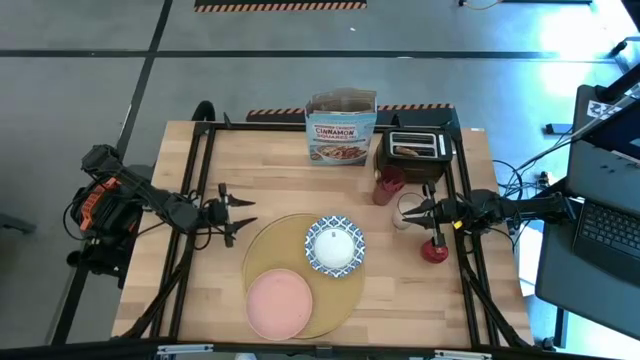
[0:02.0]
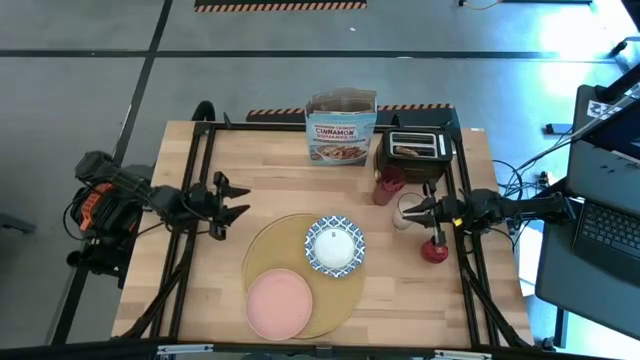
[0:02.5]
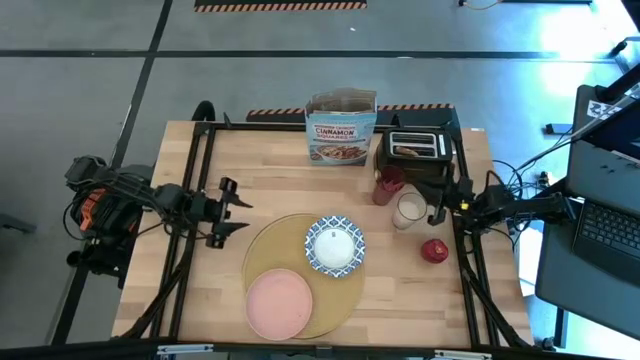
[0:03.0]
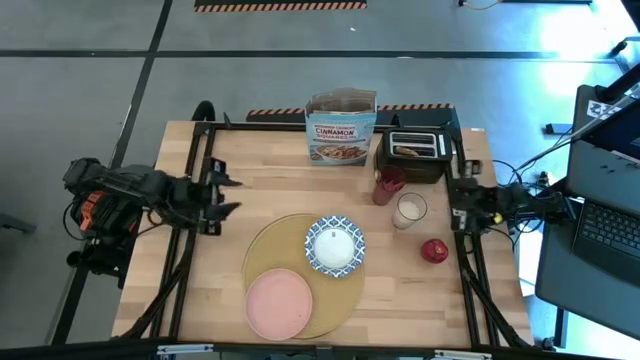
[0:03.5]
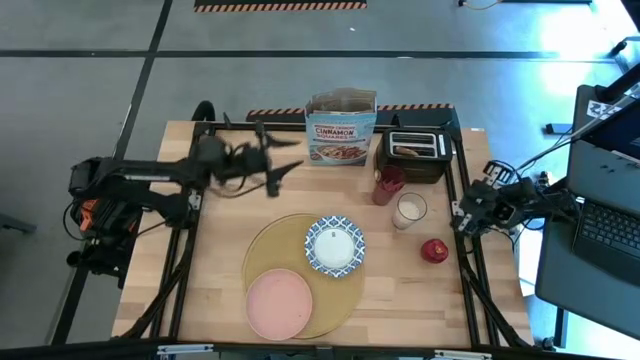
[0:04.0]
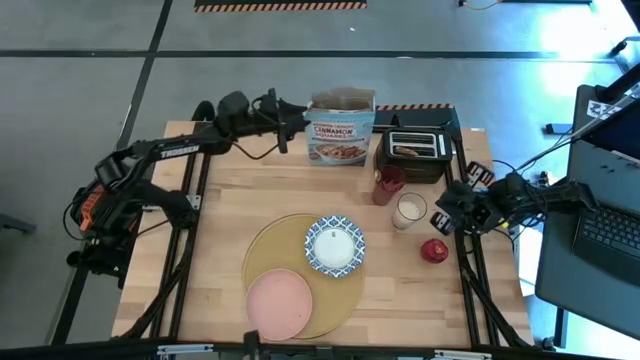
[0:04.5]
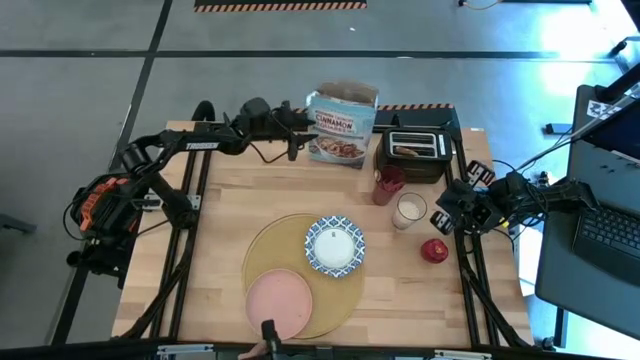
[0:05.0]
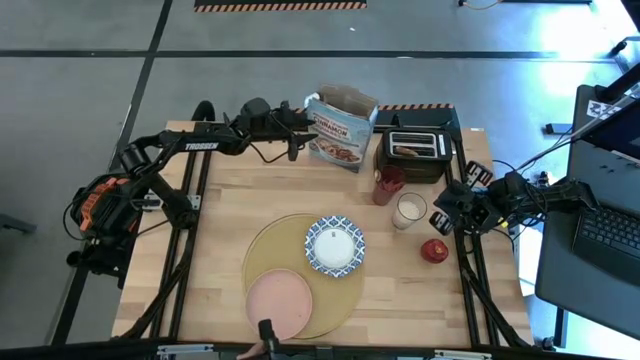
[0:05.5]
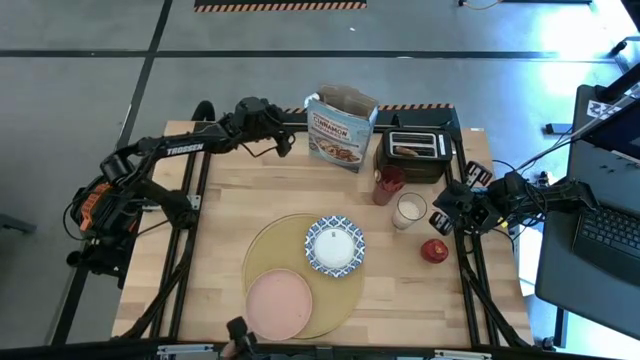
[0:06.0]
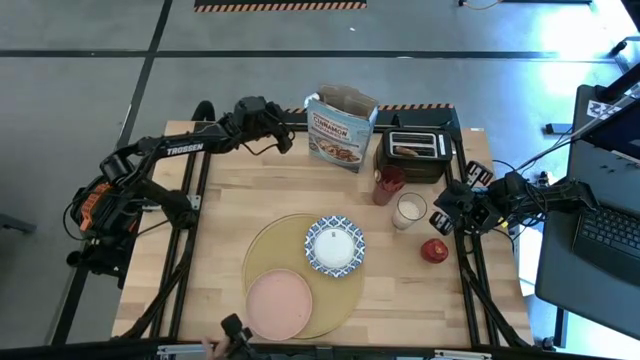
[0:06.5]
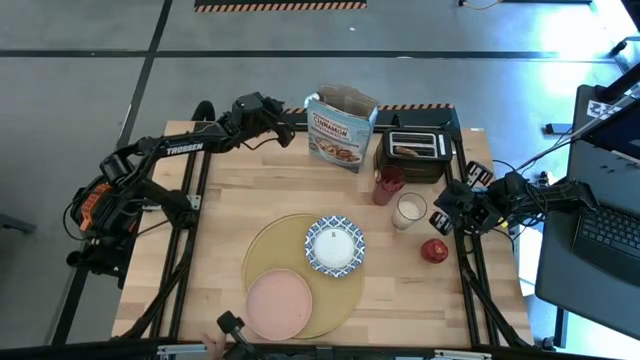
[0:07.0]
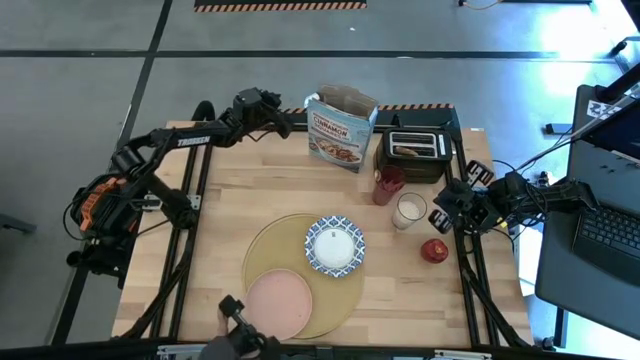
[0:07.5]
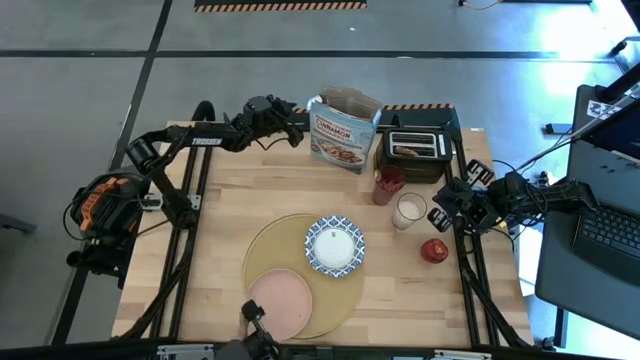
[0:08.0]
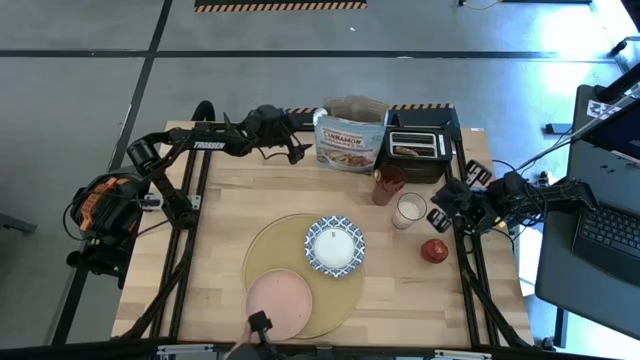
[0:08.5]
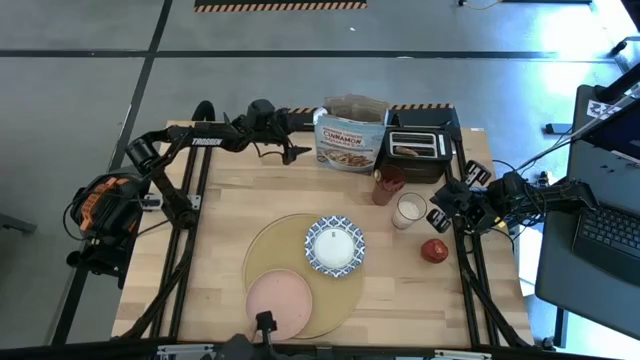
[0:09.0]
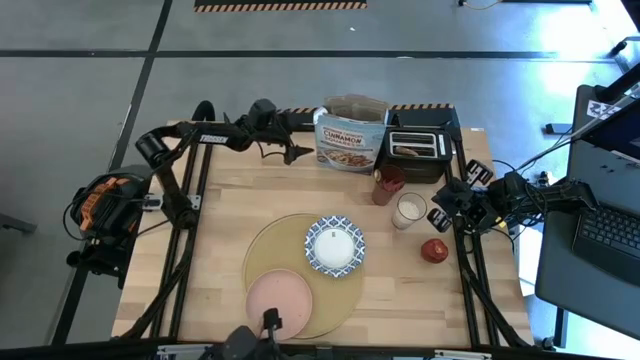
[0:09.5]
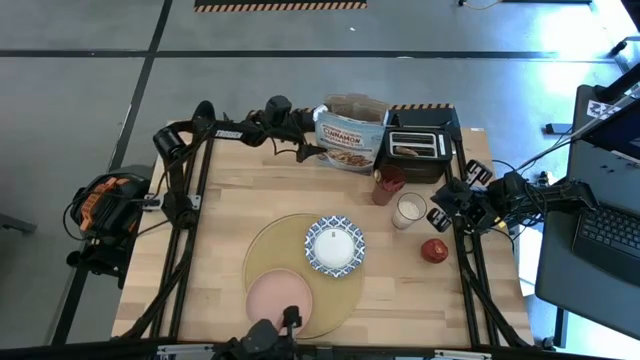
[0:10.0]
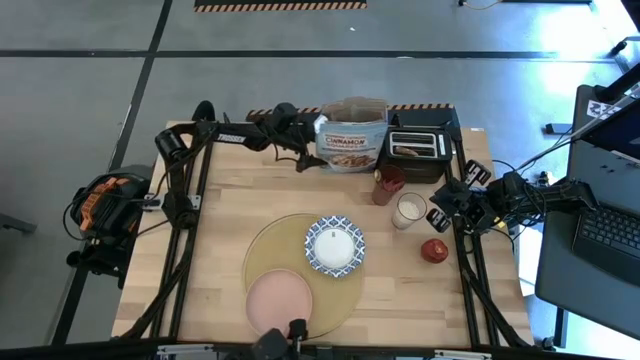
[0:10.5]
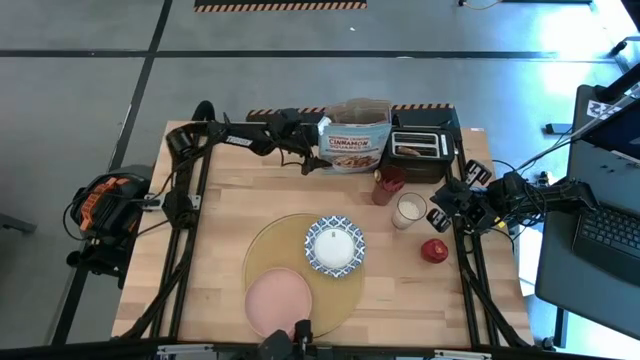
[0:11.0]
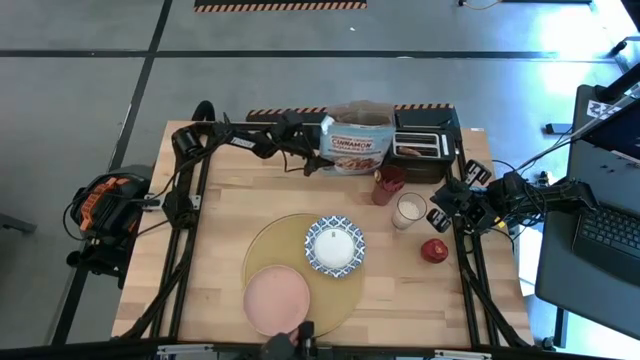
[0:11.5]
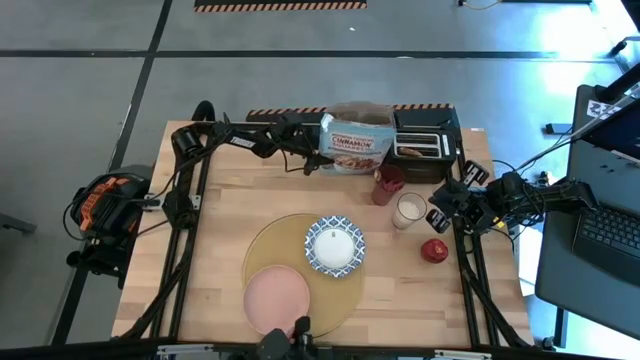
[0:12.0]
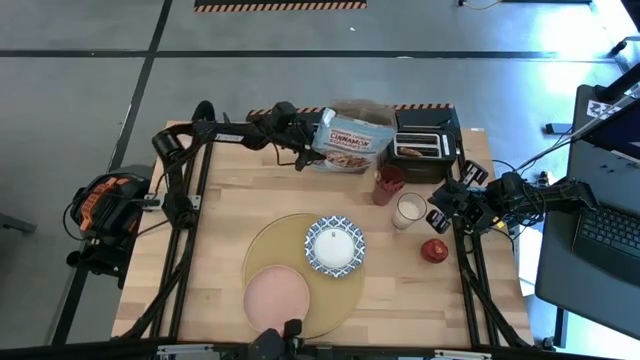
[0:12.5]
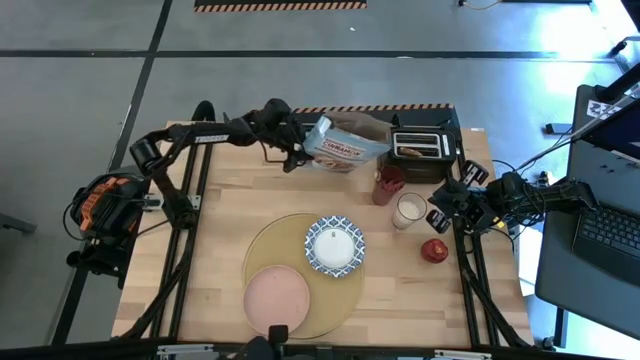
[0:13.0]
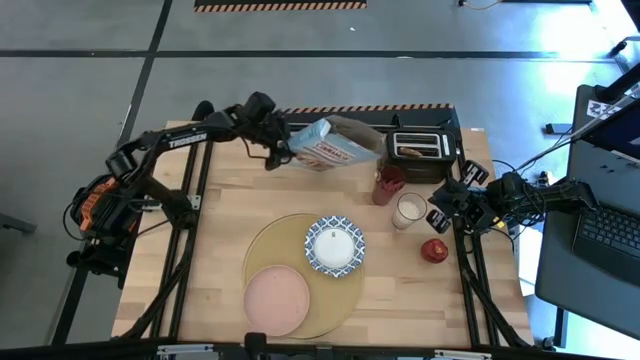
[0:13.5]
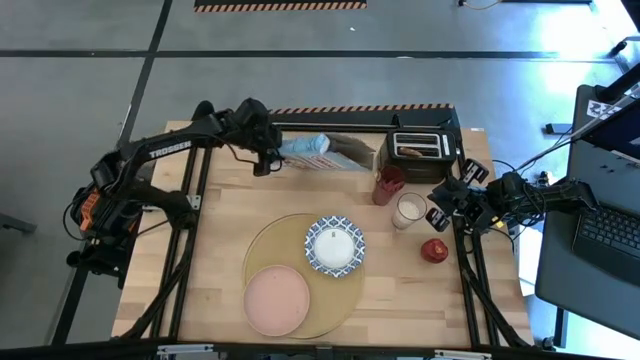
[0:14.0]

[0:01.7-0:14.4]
Task: Arrange a breakfast setting
Pour the cereal from the cereal box into the white pattern bowl

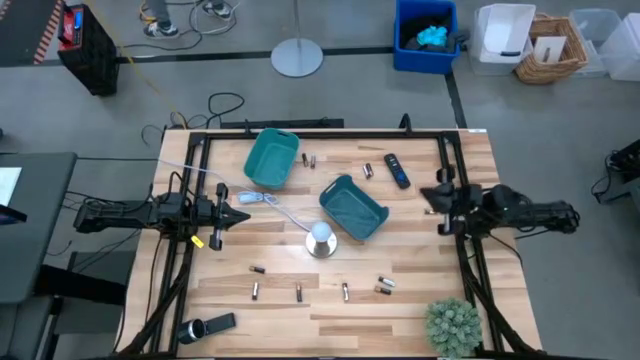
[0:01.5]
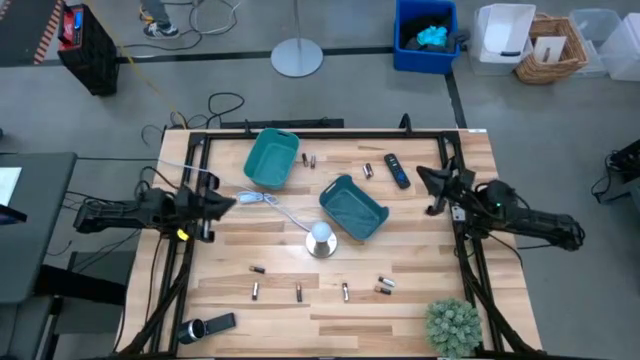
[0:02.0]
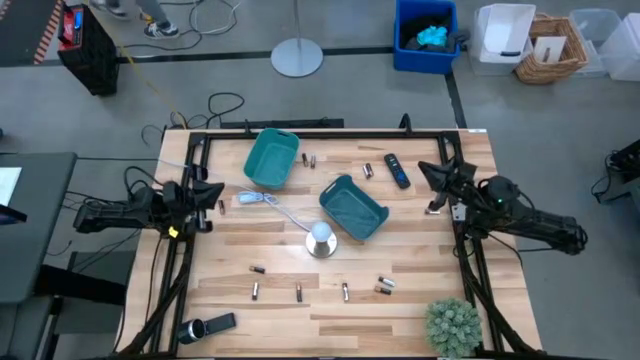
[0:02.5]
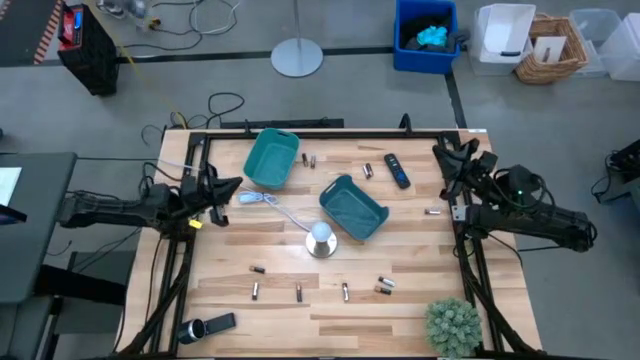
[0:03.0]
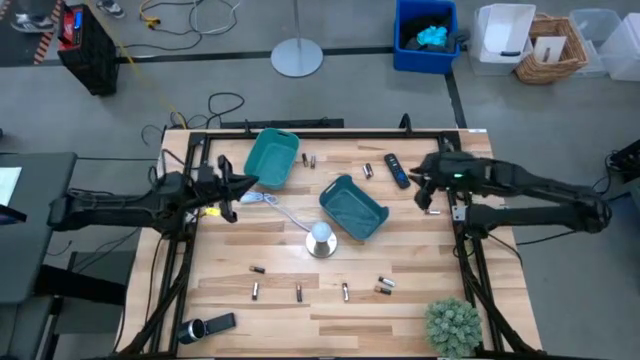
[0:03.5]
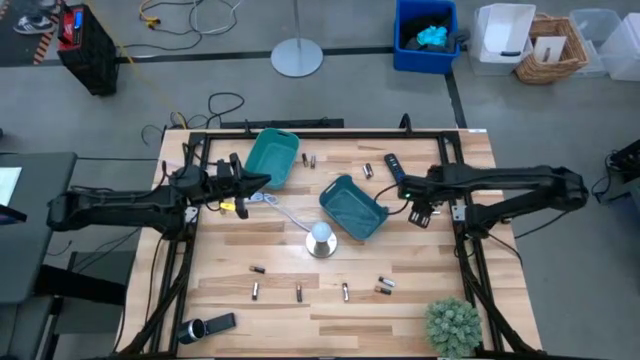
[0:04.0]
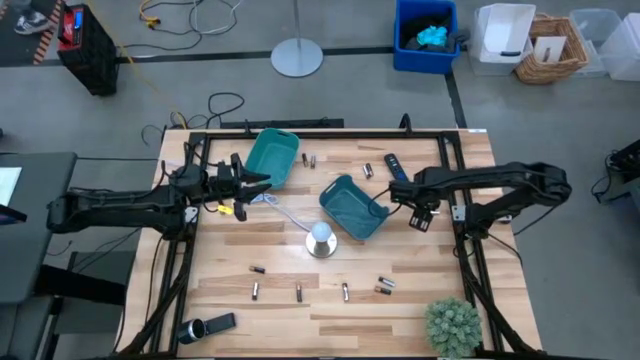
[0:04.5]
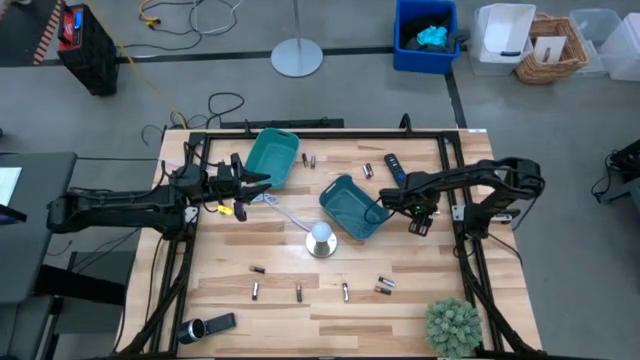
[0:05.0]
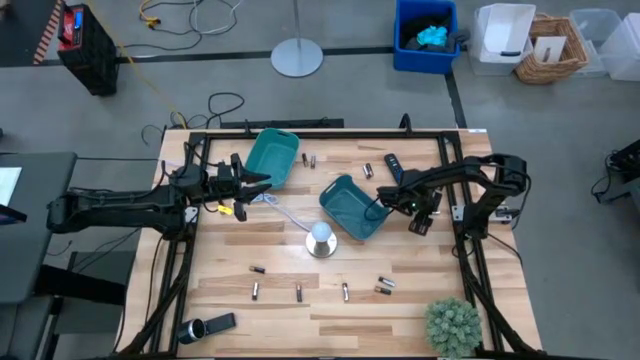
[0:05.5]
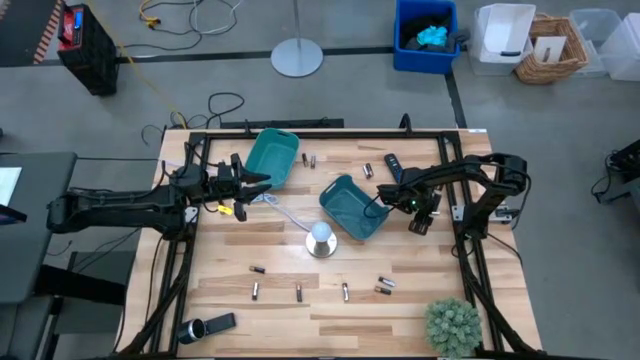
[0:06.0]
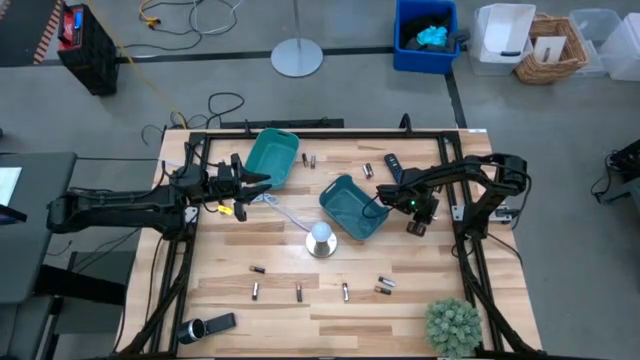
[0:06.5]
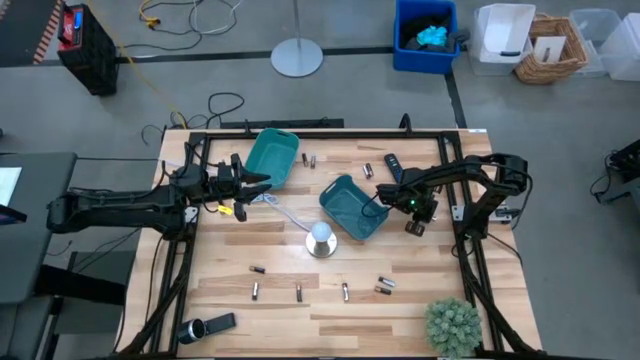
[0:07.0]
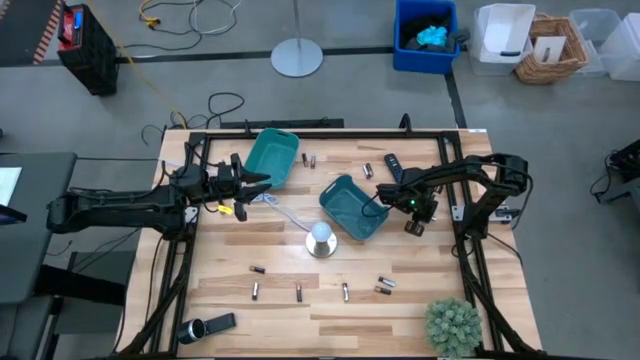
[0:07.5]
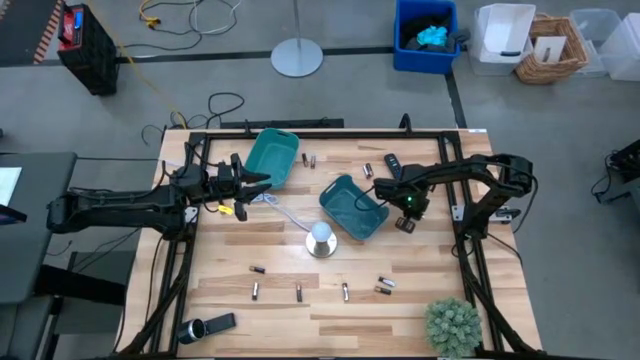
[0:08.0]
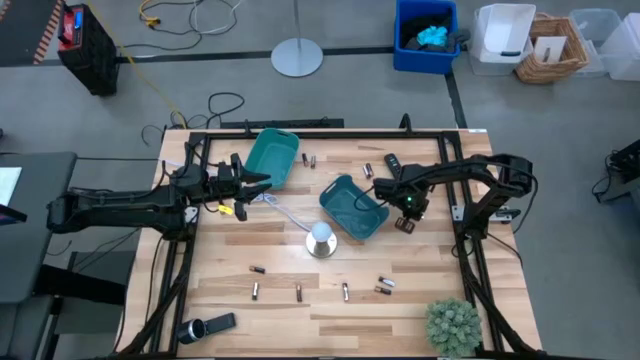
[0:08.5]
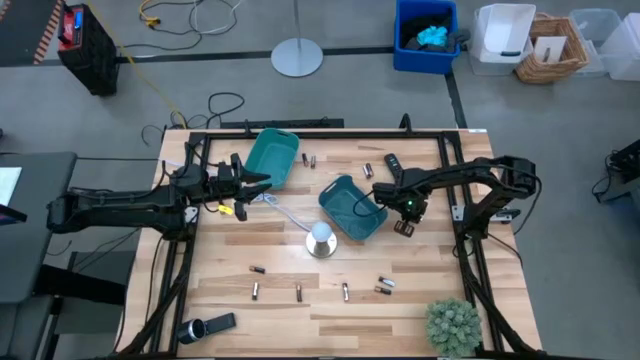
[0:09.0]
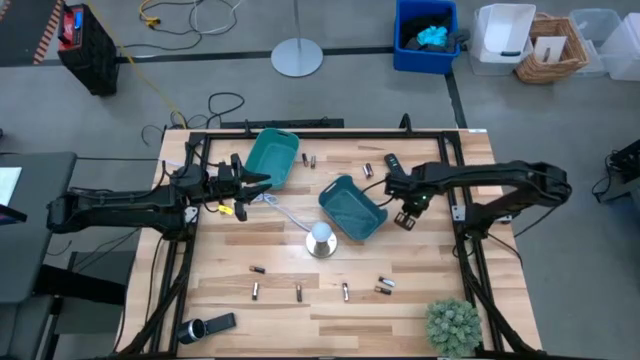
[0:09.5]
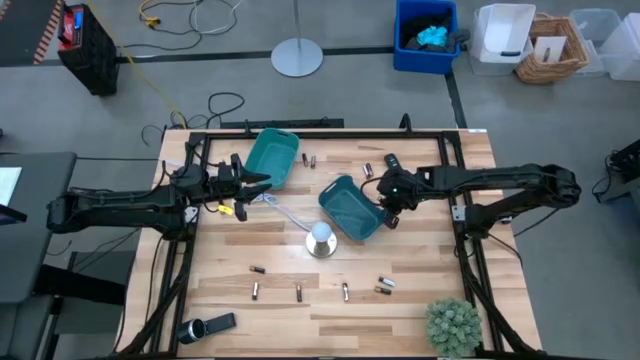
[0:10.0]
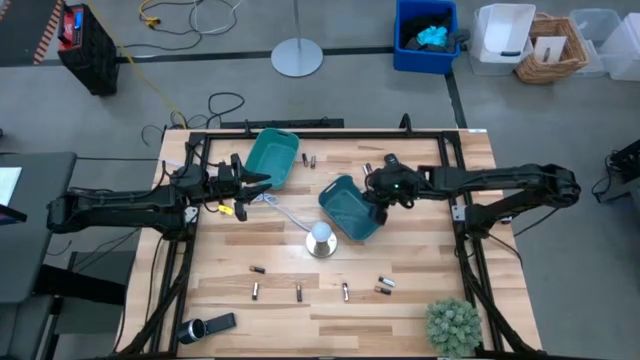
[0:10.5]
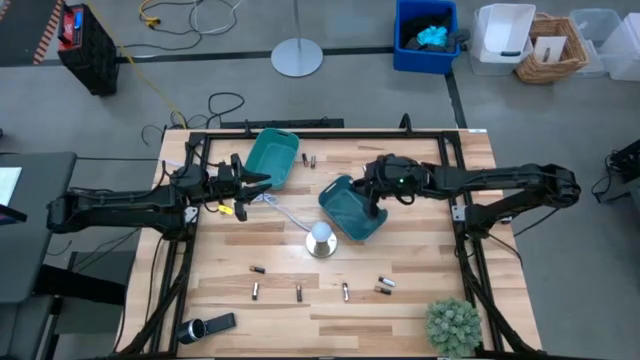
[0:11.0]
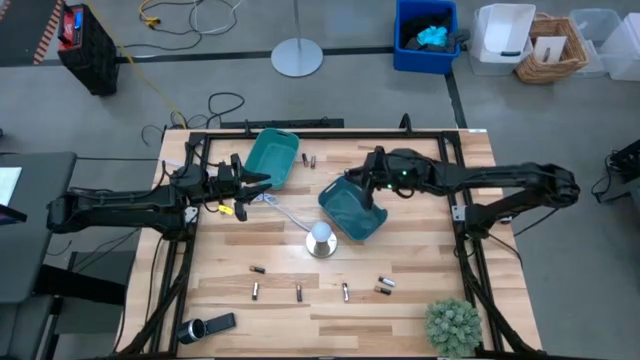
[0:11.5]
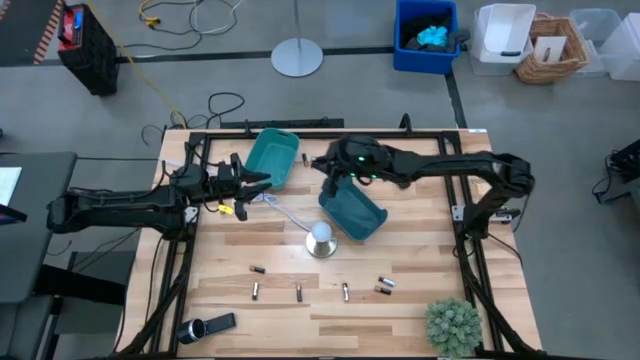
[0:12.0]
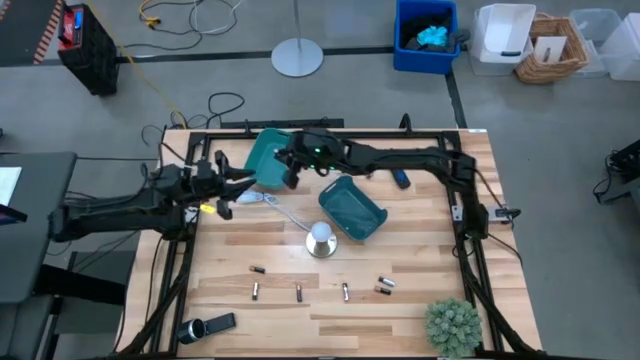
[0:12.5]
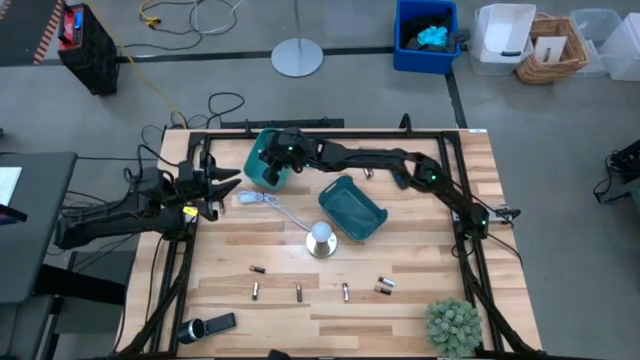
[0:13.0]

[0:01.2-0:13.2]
Task: Sort batteries
Put the silver battery into the green bin
